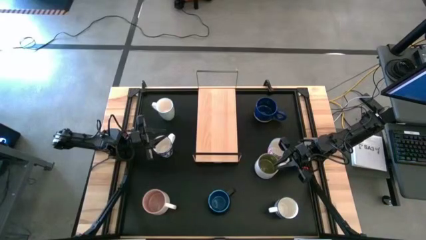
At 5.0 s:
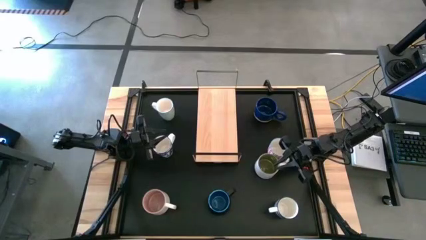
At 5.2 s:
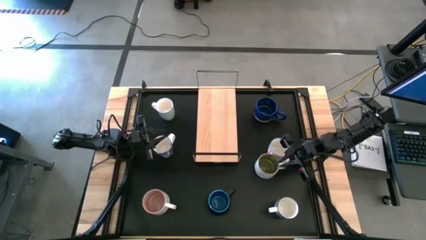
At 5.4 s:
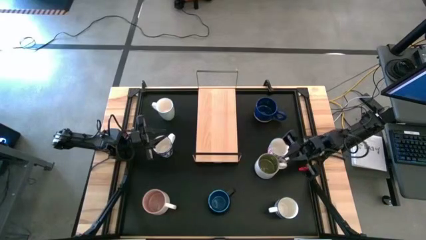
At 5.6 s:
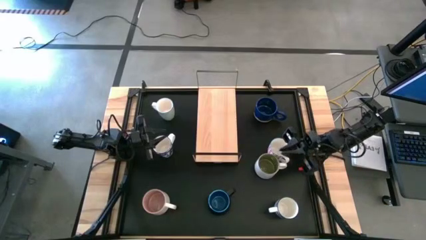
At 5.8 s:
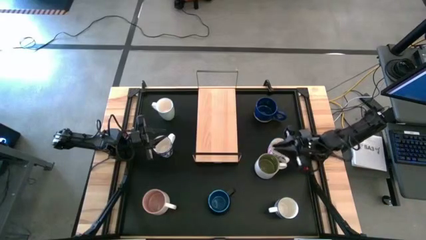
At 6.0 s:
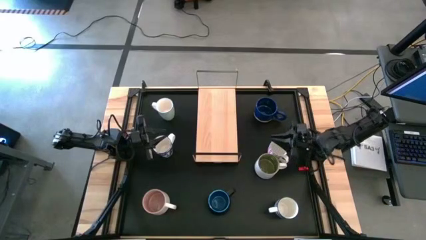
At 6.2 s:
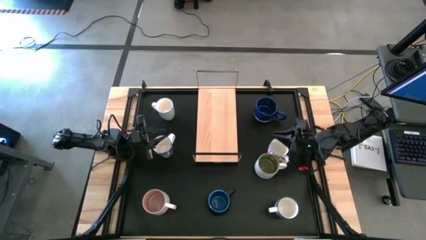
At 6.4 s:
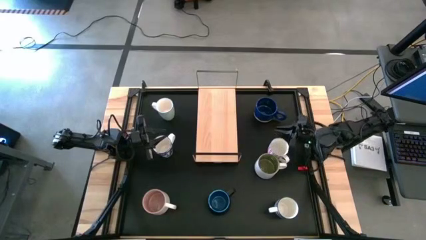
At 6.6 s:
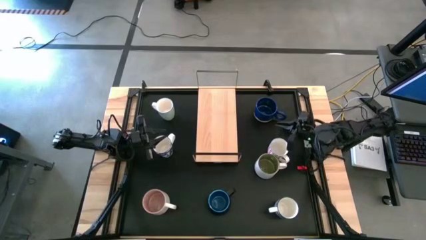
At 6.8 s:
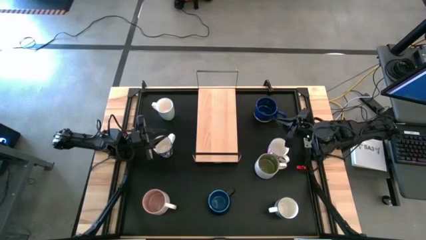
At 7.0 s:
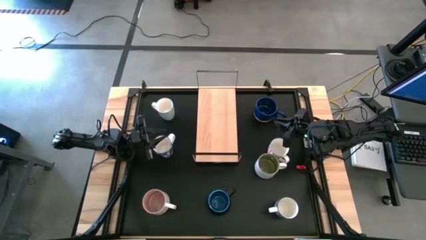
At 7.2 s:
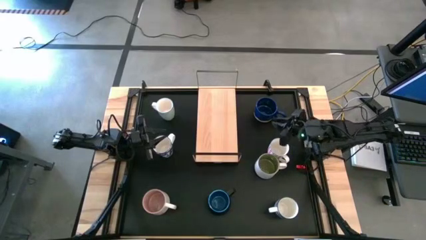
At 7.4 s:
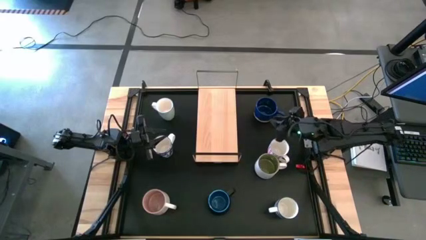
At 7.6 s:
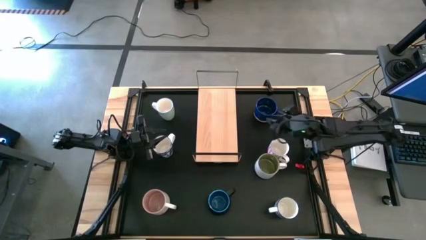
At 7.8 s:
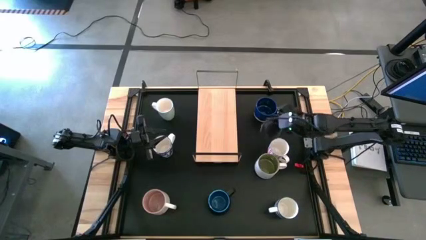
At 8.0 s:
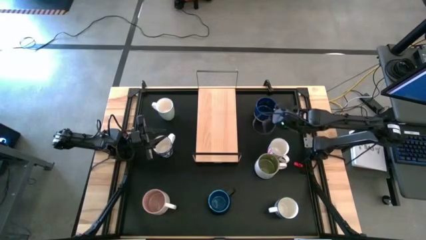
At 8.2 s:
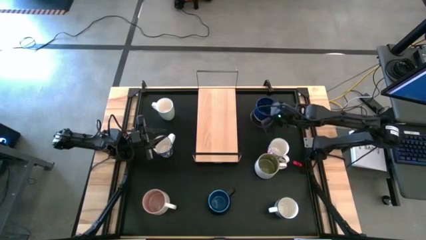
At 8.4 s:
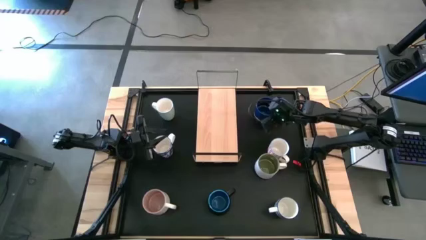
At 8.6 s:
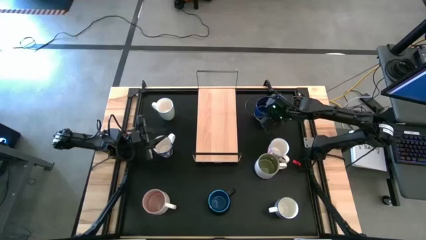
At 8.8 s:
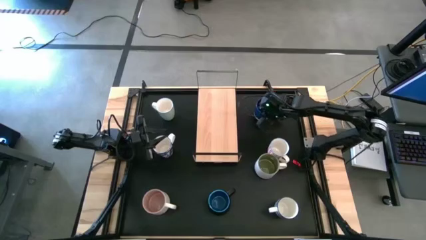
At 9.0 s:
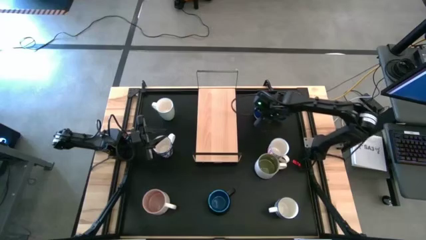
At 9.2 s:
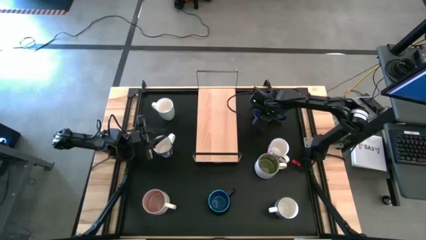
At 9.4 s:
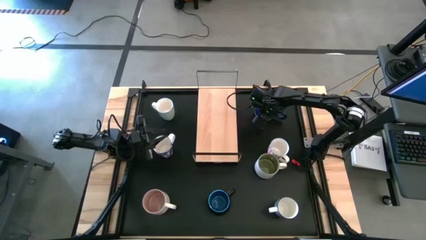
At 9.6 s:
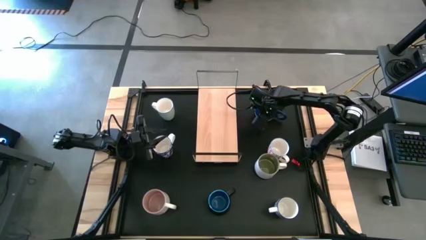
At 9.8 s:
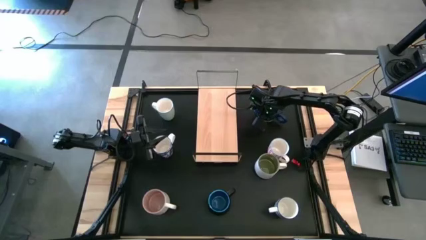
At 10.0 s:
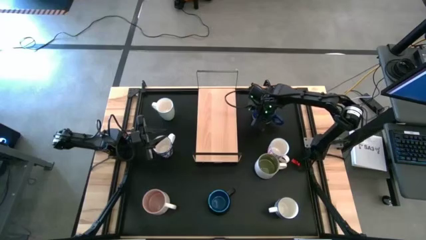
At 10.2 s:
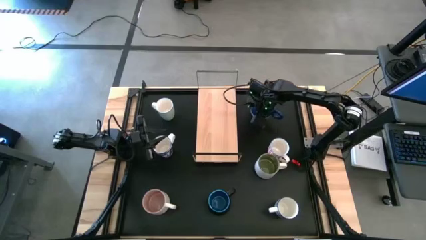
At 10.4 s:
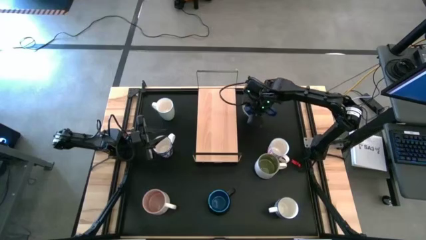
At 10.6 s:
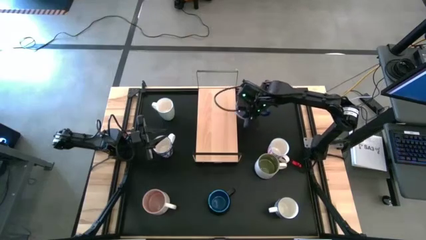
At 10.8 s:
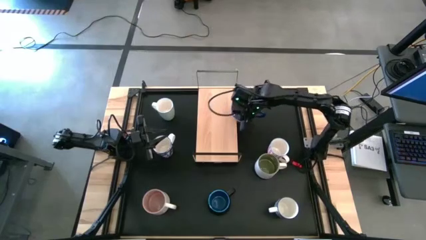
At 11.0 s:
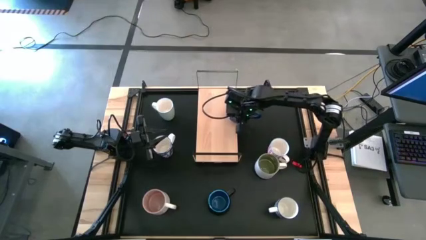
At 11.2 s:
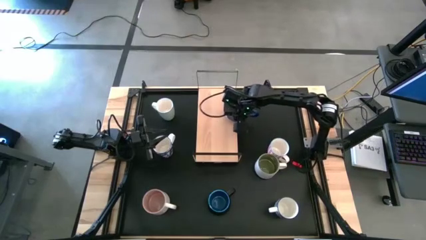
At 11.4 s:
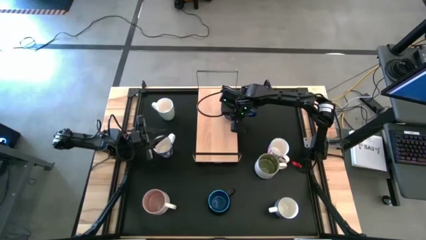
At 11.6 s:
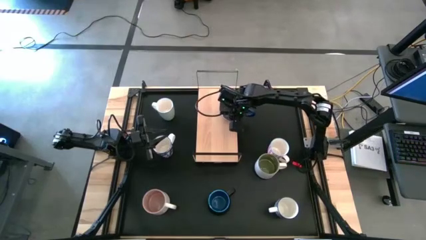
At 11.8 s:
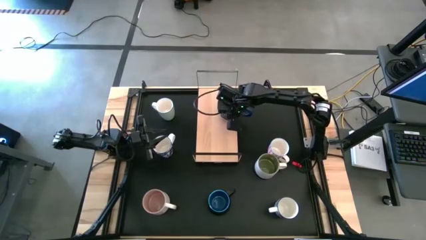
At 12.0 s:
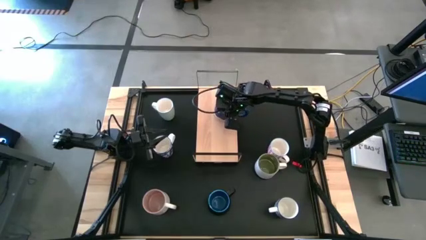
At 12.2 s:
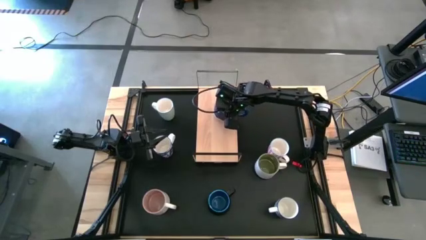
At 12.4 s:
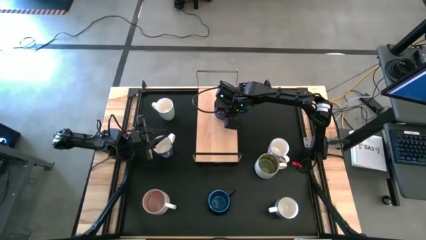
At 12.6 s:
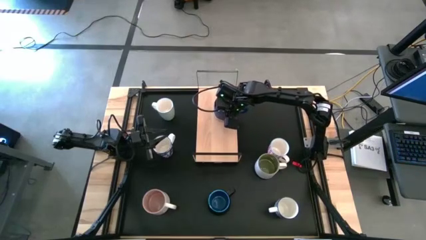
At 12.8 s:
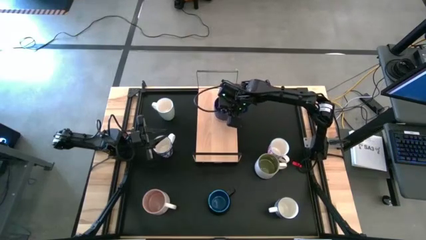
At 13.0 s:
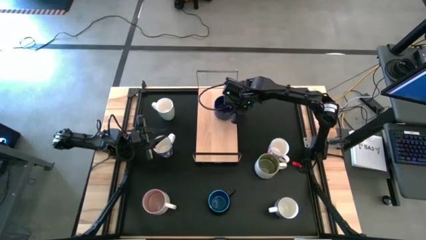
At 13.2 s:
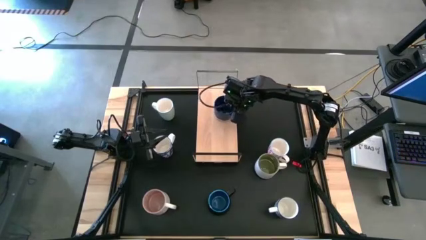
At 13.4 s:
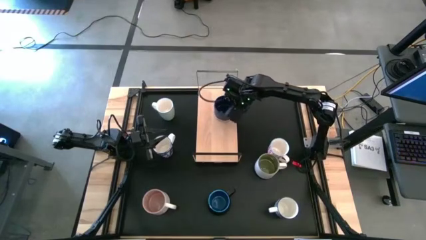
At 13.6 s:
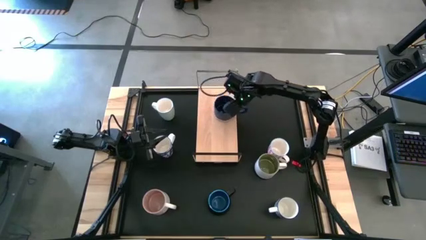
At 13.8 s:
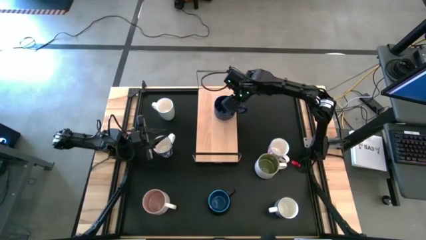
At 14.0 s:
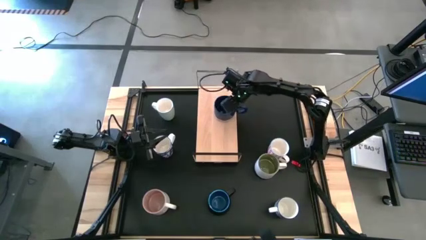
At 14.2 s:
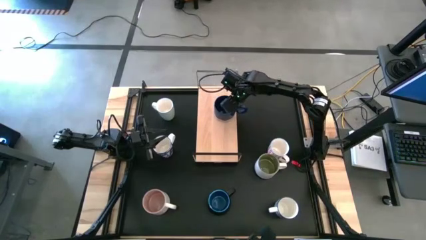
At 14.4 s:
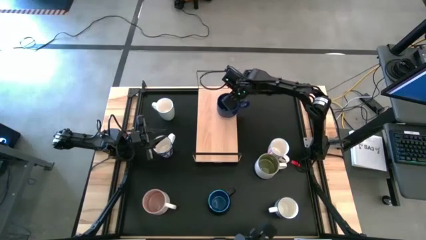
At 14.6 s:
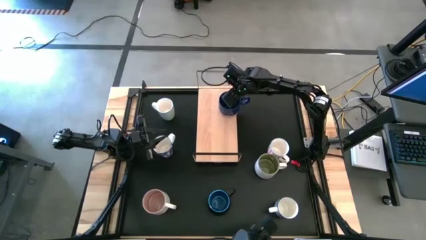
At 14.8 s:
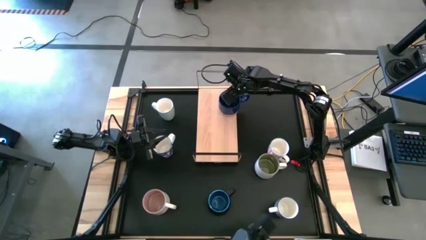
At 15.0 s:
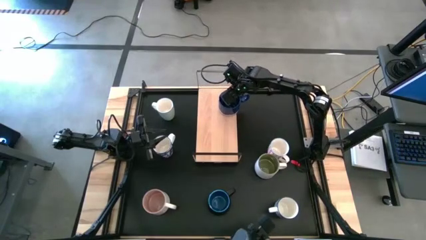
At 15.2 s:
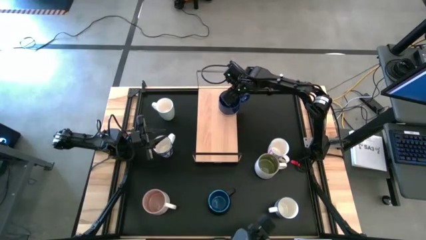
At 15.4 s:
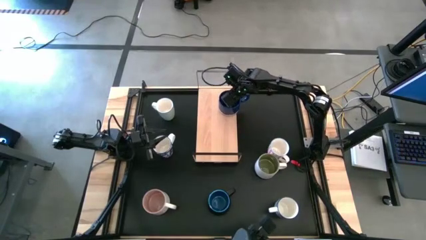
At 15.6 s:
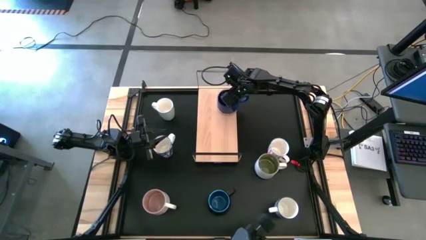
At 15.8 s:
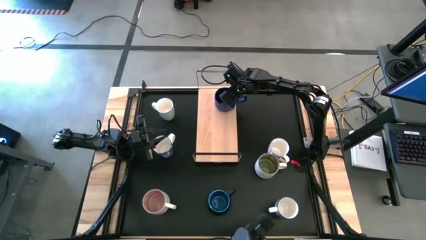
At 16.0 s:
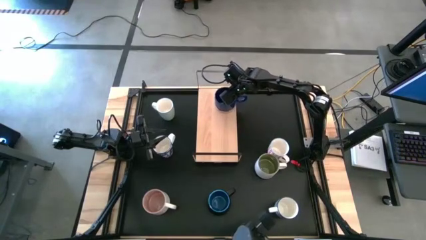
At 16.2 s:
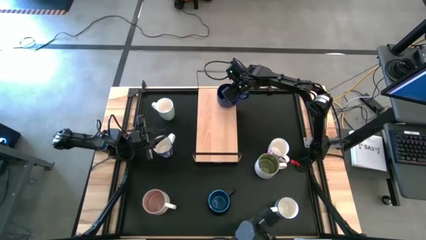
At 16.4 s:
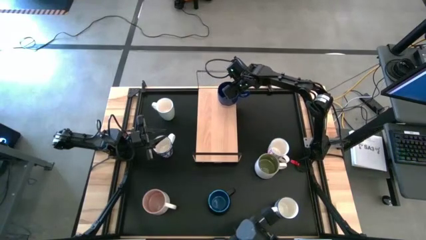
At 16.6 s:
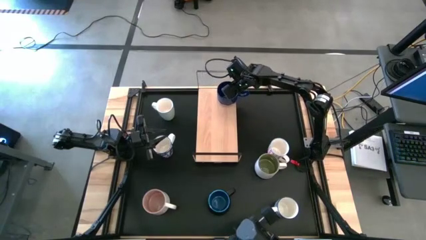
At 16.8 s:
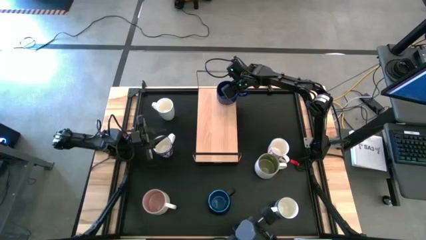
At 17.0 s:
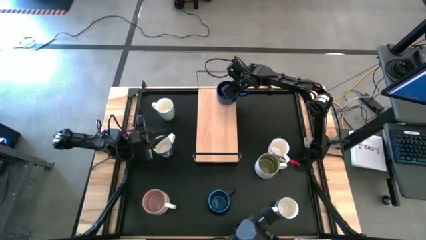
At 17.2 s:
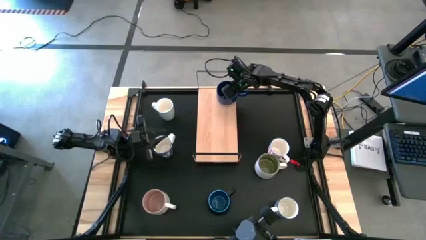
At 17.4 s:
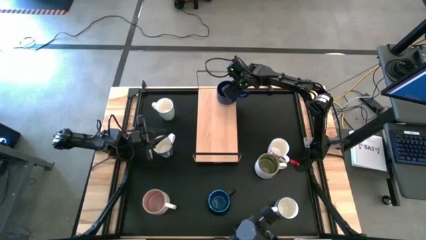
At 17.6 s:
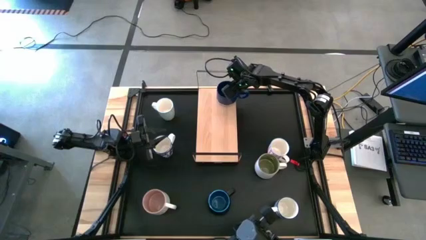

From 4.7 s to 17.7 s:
Task: Place coffee mugs
Put the blue mug on the shelf

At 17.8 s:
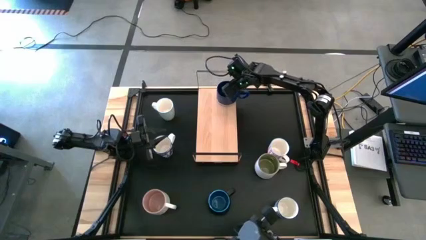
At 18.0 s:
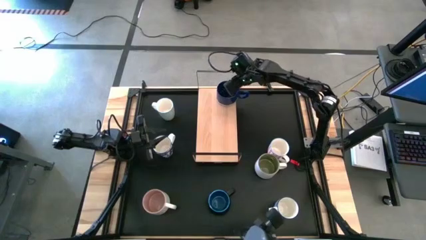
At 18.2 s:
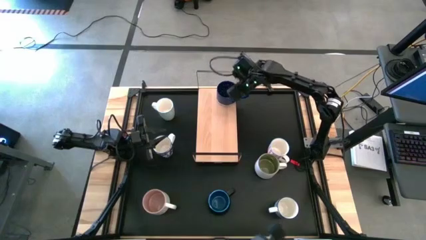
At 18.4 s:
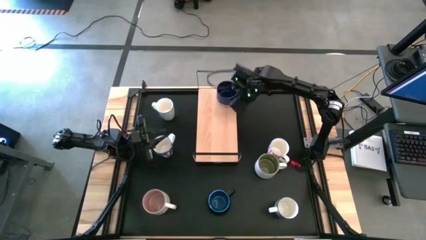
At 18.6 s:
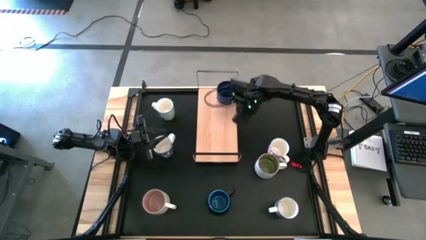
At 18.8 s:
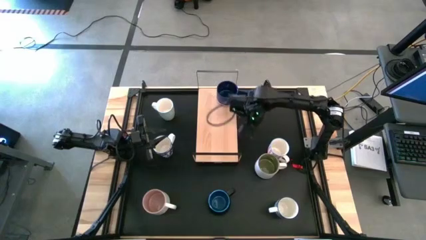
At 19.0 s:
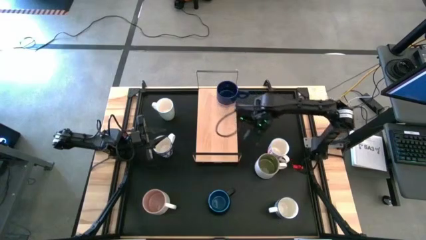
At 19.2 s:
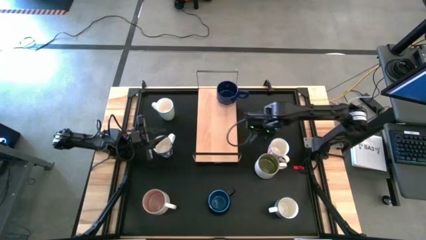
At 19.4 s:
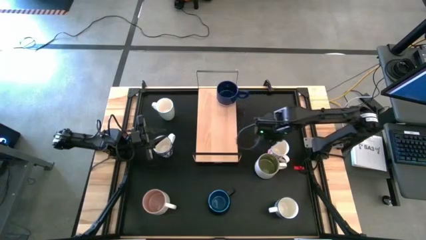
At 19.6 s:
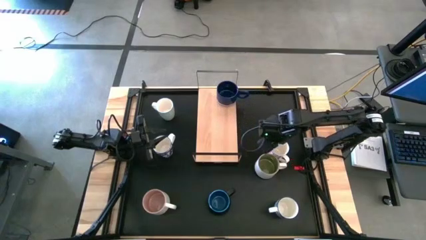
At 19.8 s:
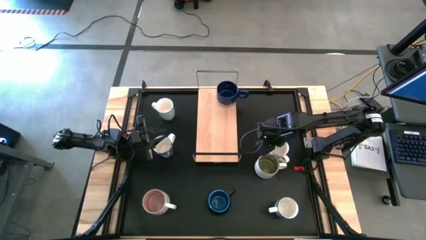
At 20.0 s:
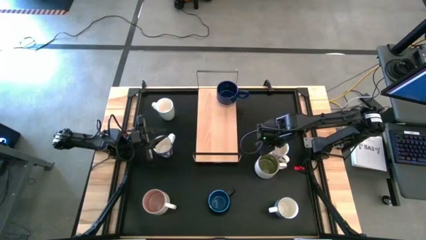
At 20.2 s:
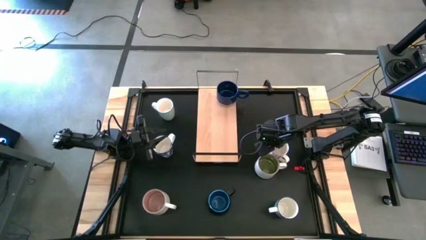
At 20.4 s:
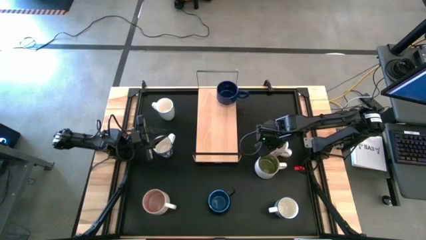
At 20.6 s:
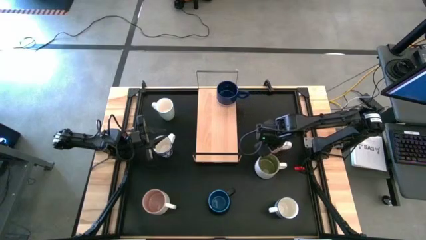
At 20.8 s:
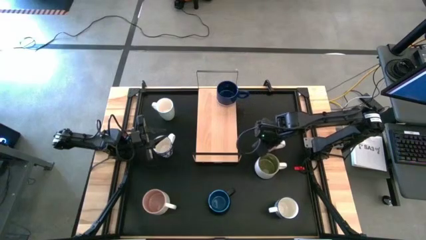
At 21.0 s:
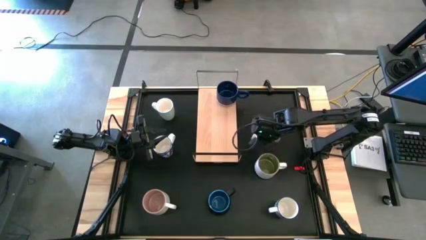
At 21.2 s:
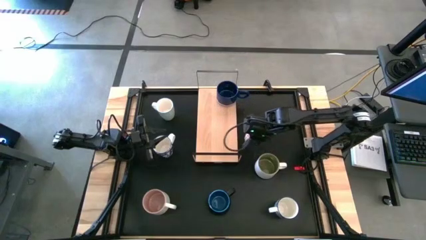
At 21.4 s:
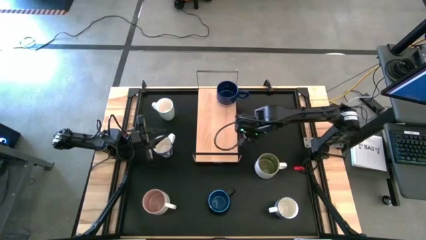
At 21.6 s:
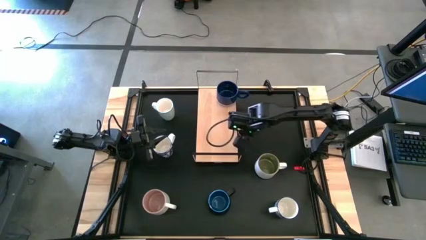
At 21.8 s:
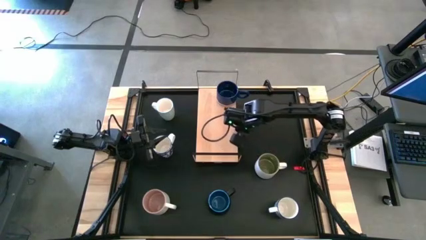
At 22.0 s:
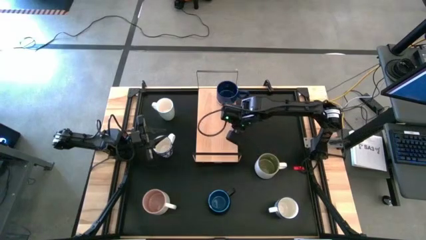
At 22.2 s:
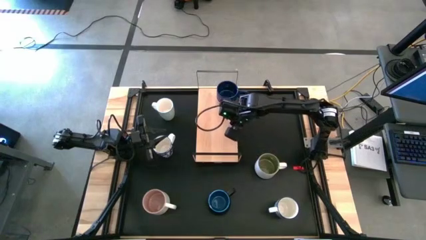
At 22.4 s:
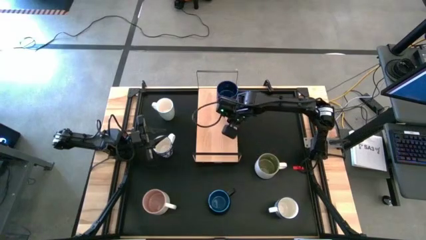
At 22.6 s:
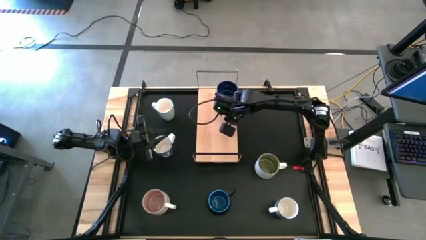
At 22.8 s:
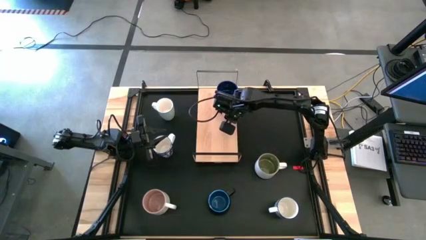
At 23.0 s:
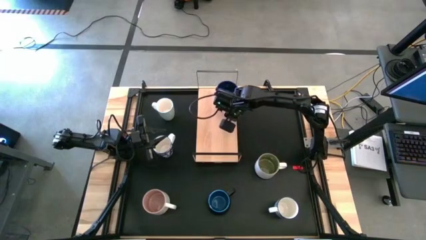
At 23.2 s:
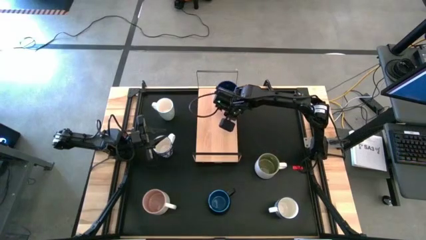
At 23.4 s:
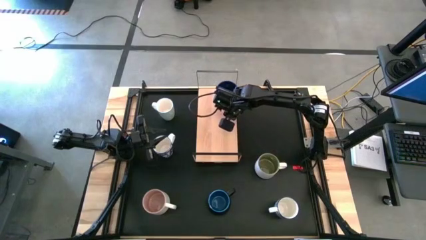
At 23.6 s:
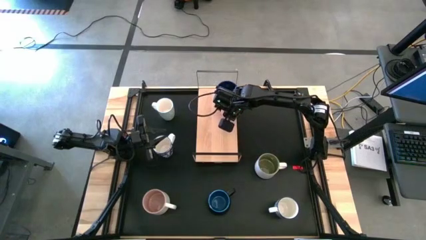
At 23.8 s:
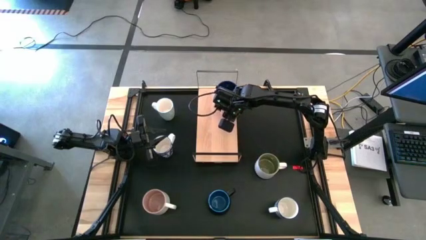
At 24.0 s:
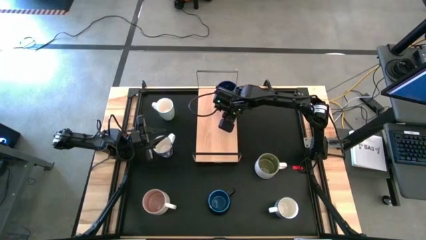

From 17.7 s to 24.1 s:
Put the red patterned mug on the shelf
